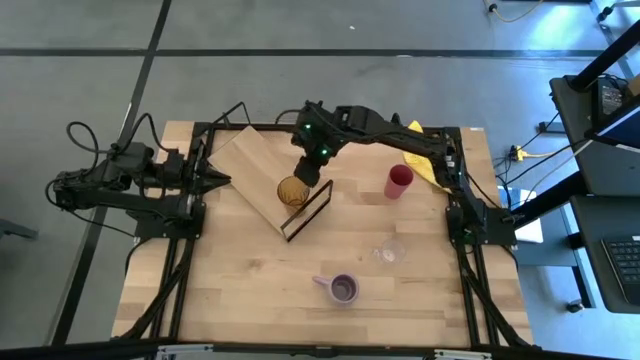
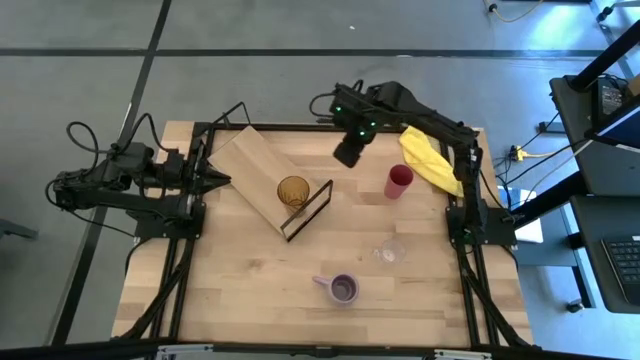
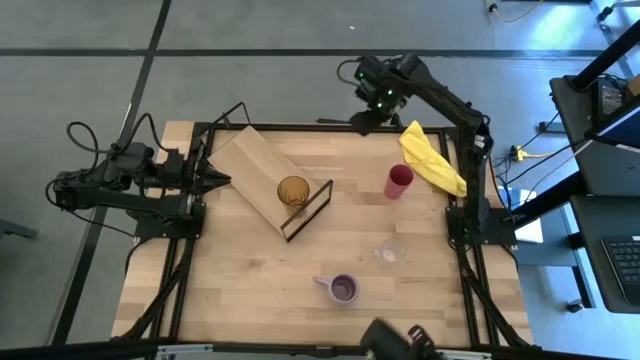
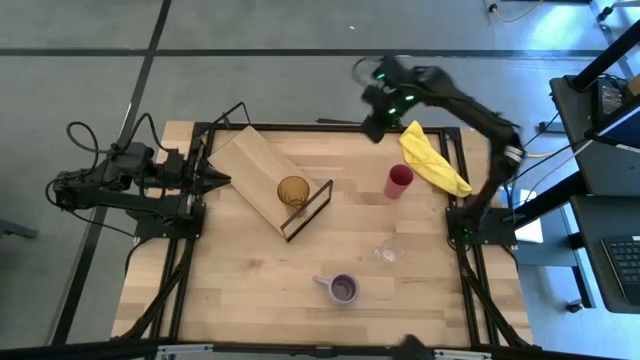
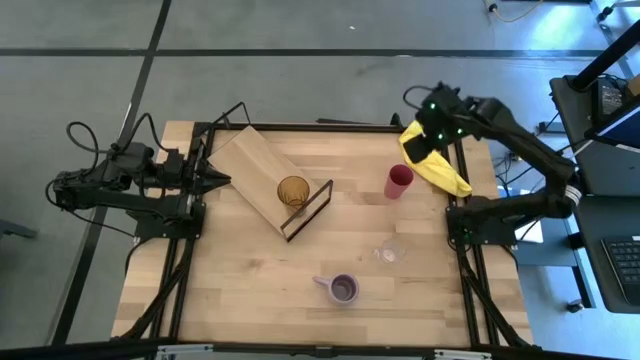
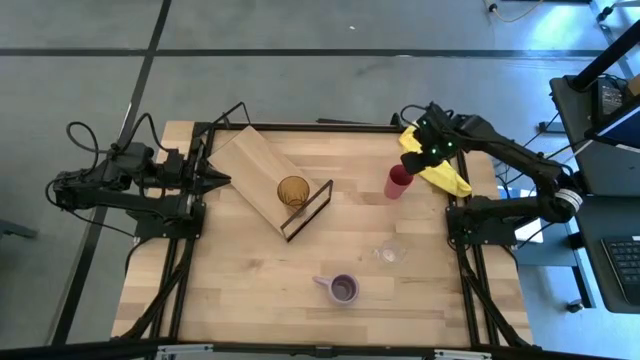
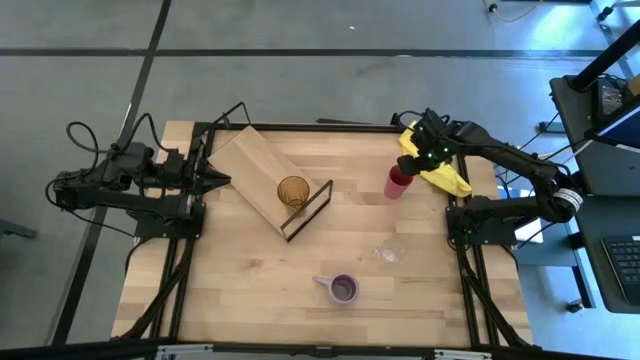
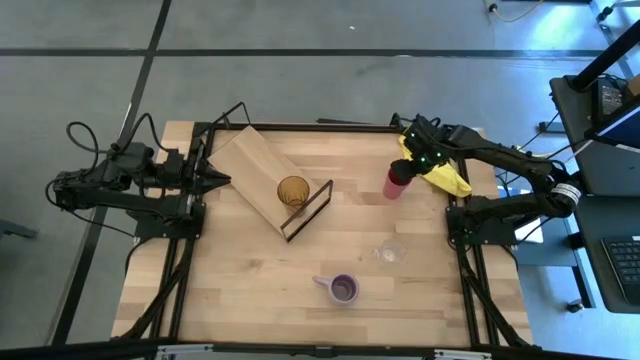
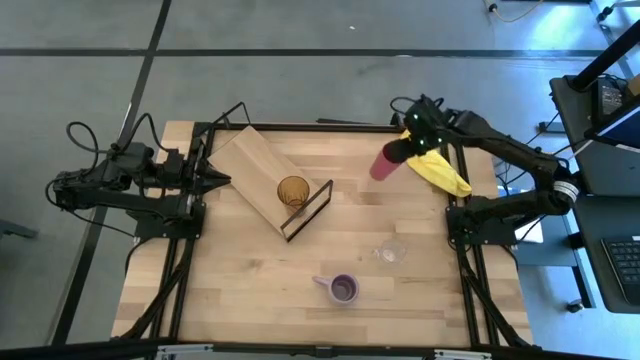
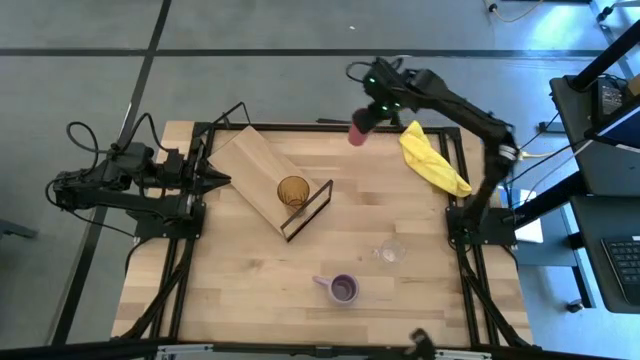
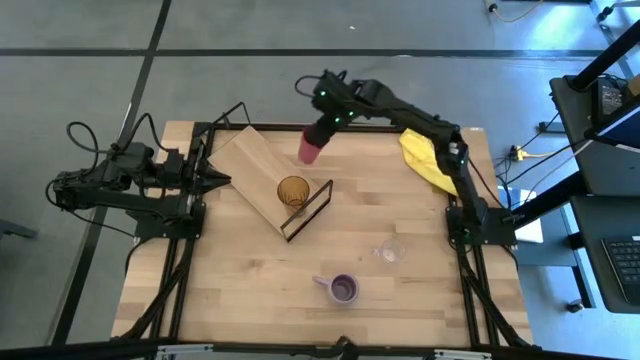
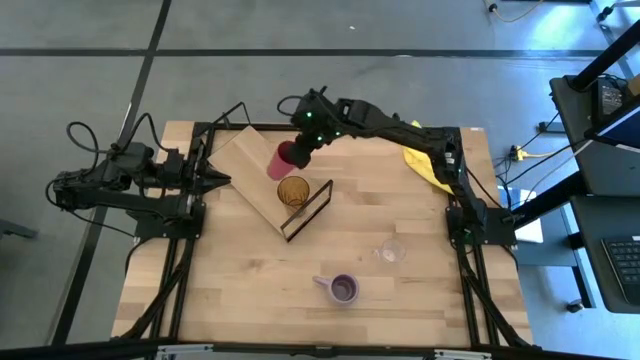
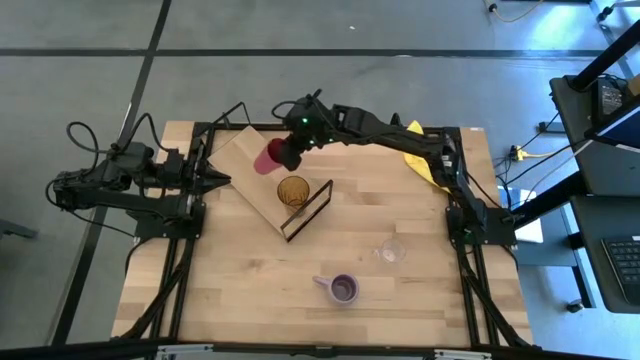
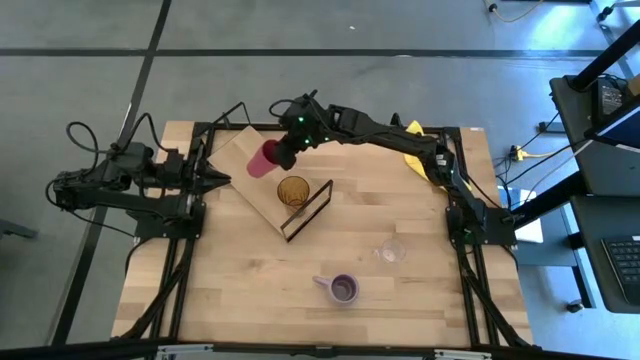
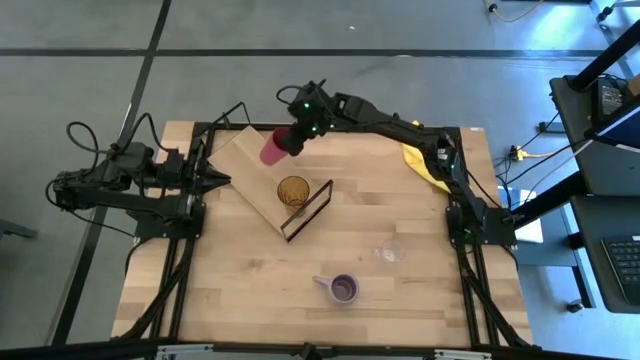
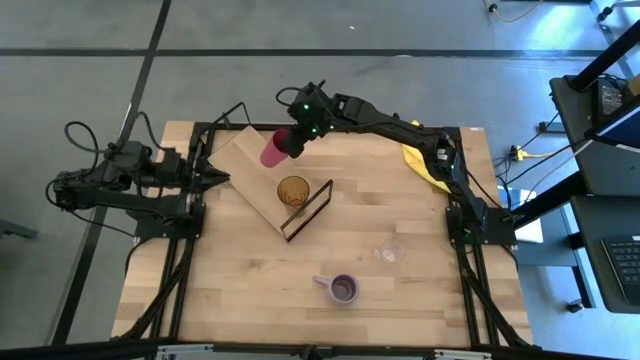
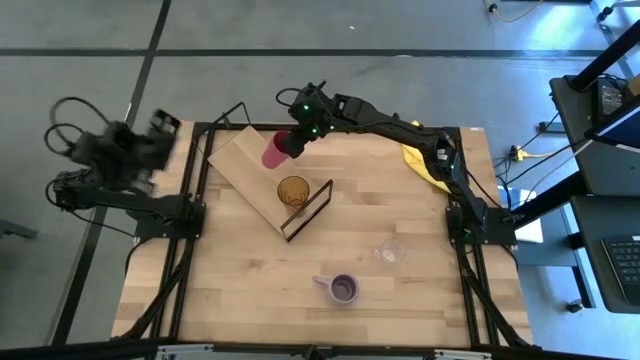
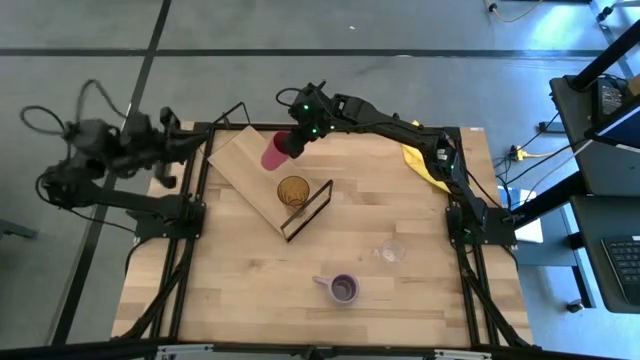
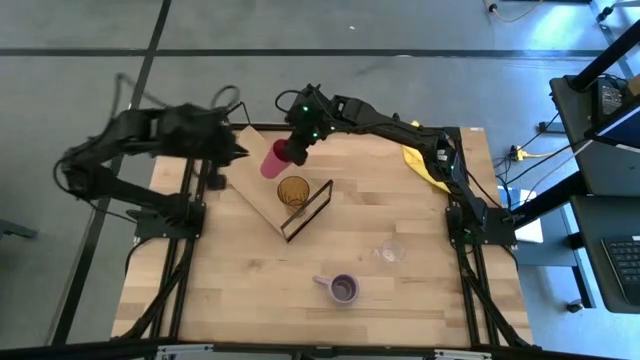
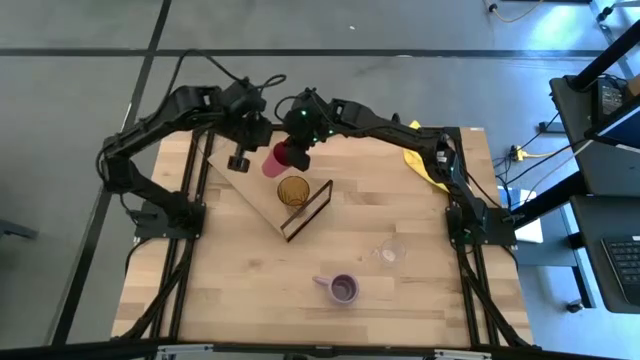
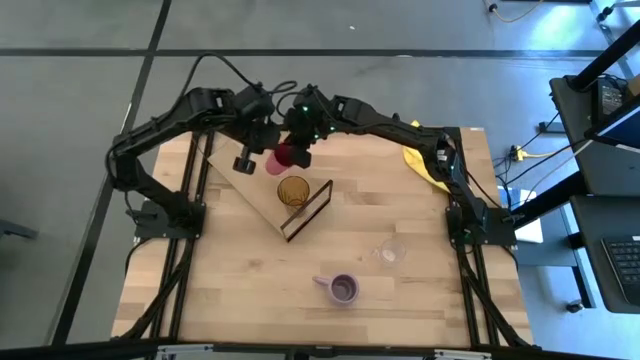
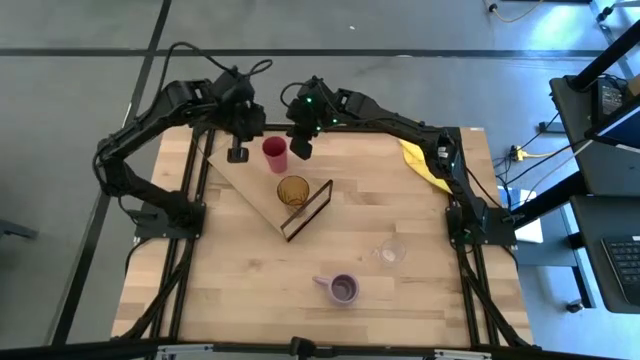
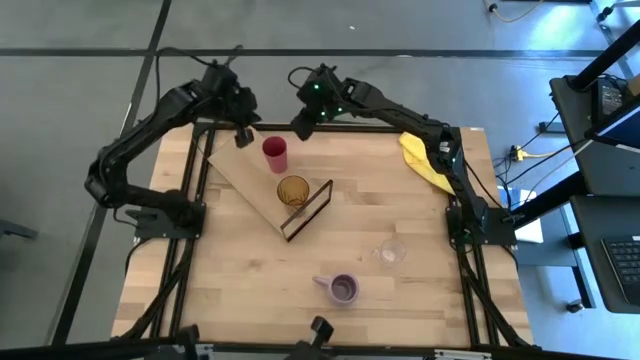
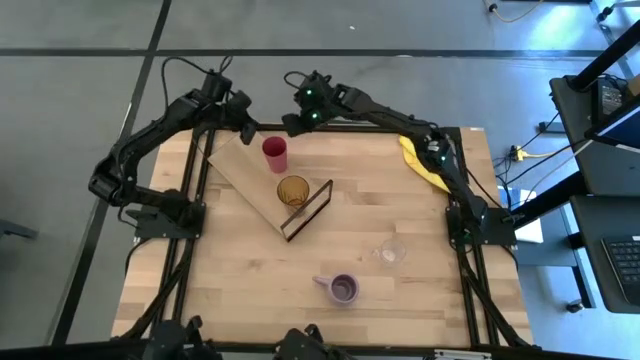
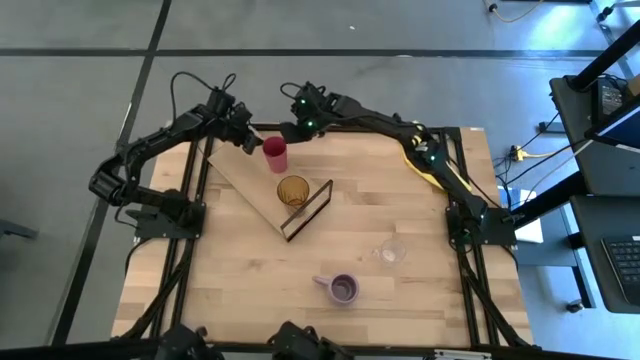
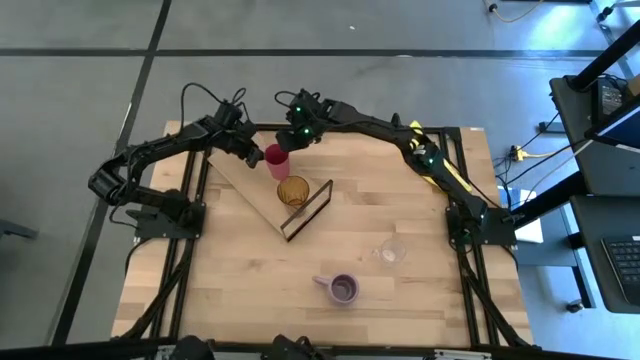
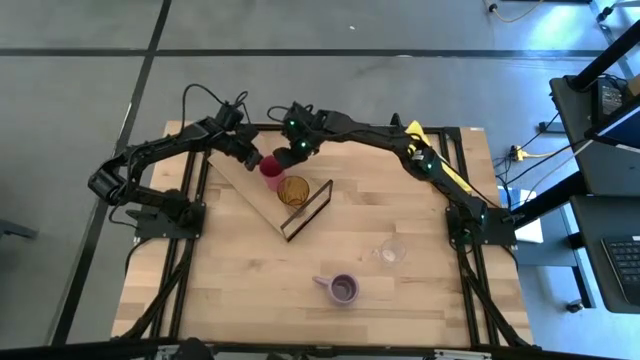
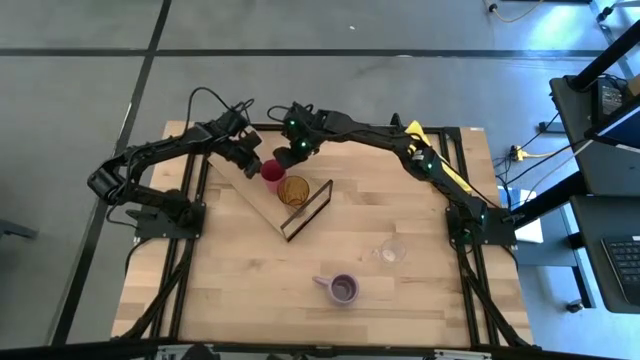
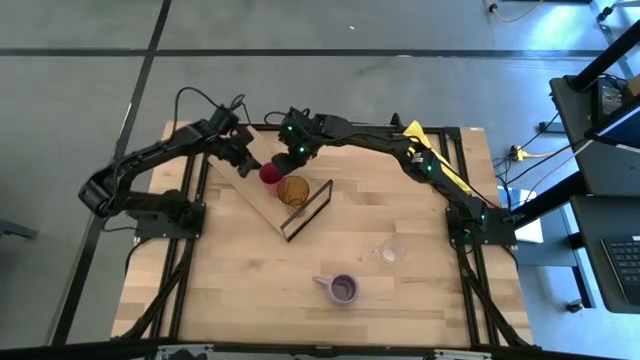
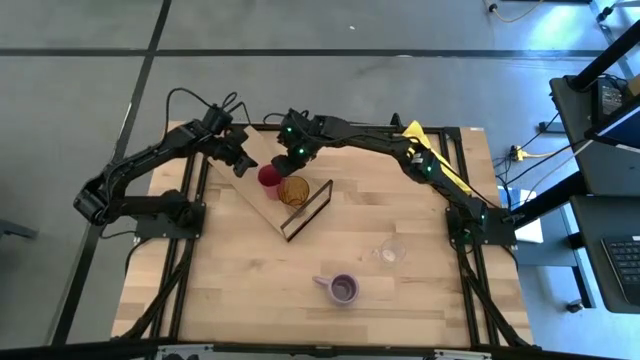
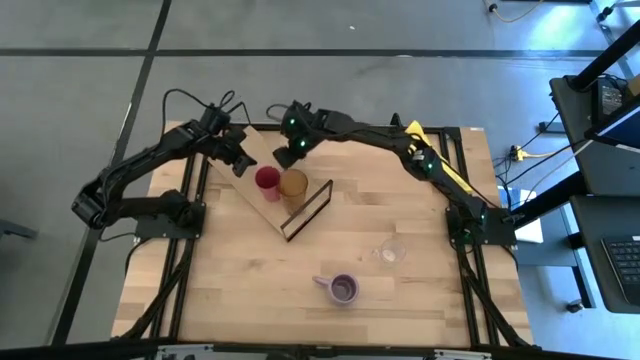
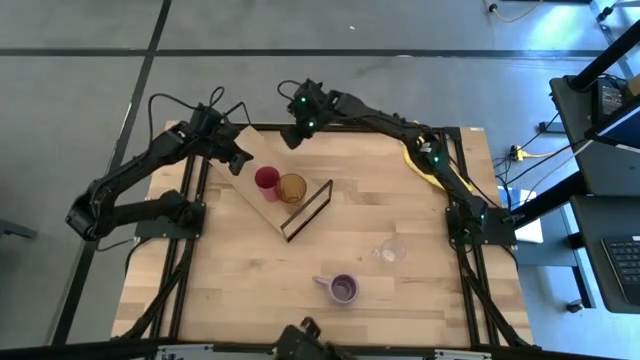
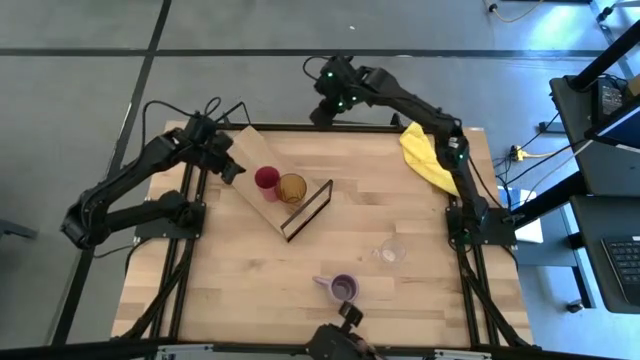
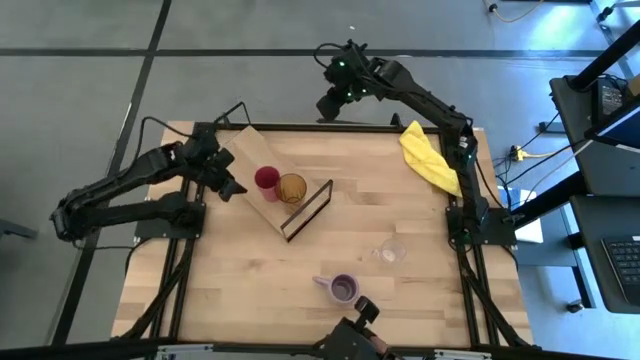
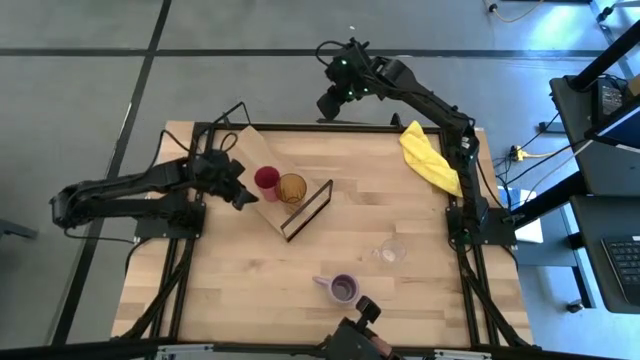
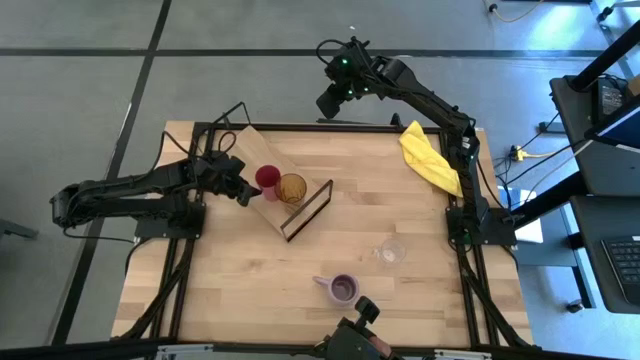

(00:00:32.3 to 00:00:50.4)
Task: Stack small to large cups/mugs on shelf
Put the pink cup on the shelf

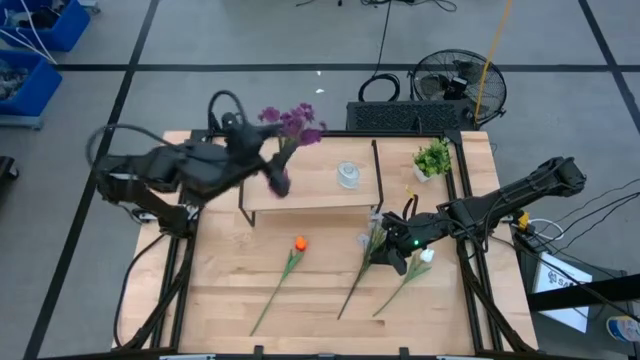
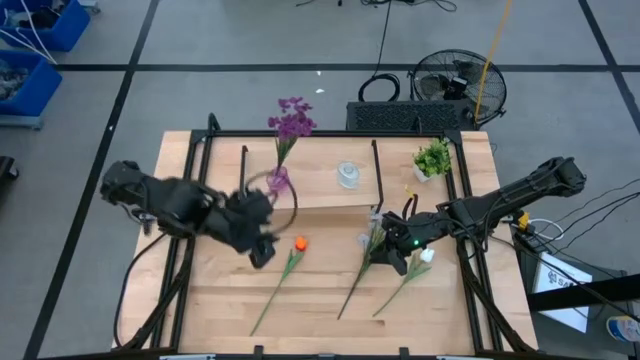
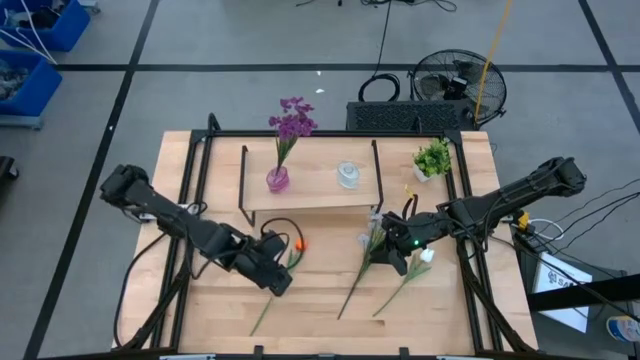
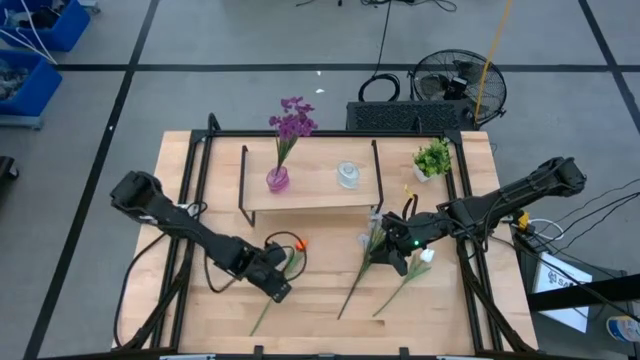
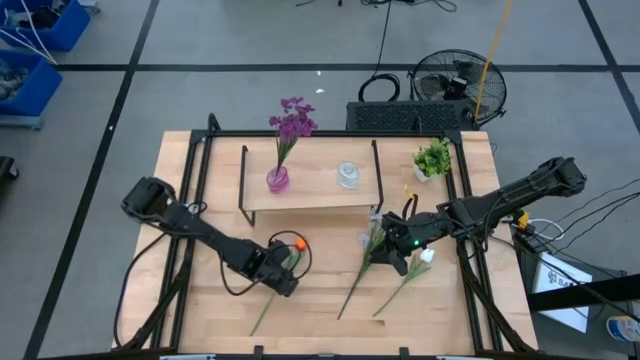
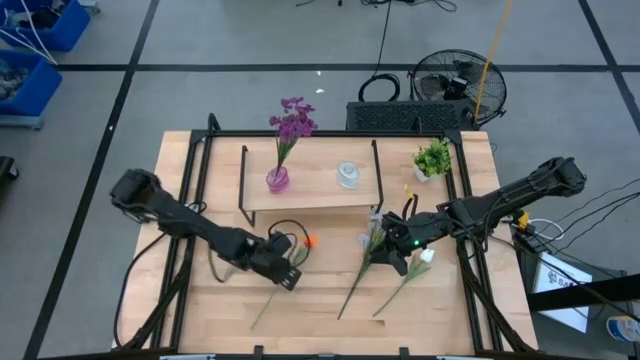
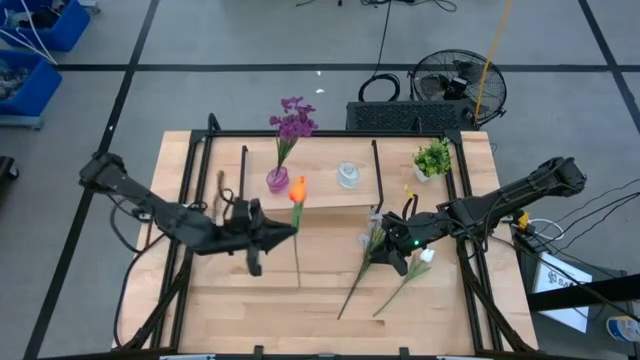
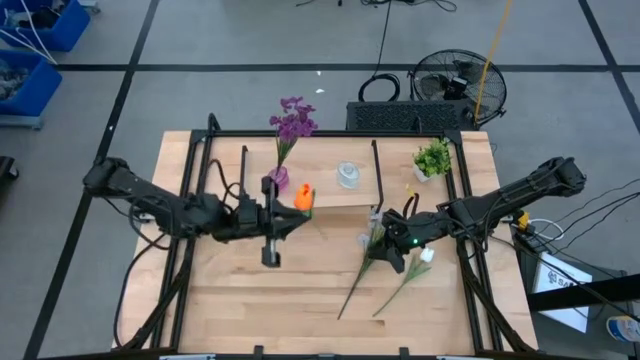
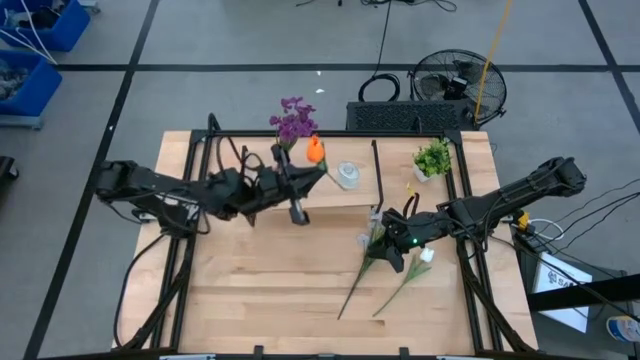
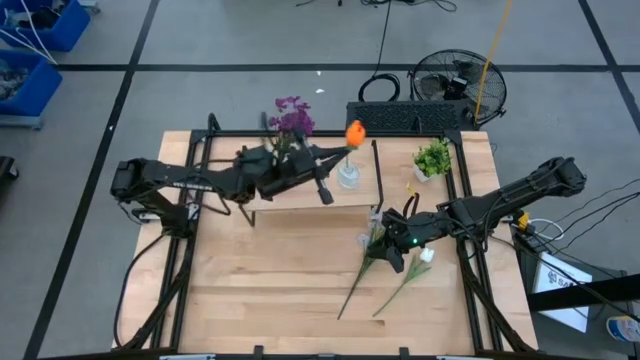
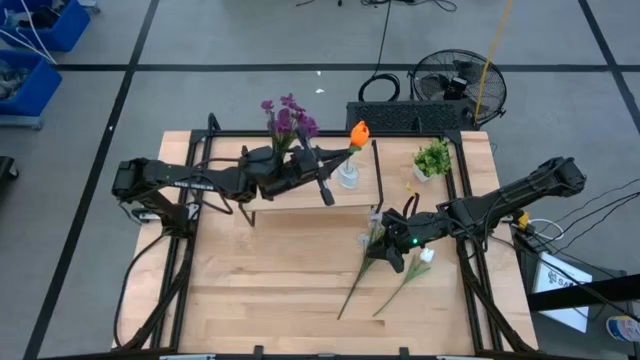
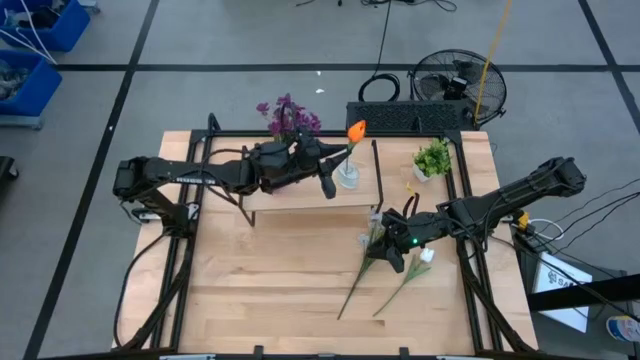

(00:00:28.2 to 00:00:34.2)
Task: Pick and place flowers into a vace then onto a shelf
Put the orange flower into the transparent vase on the shelf
